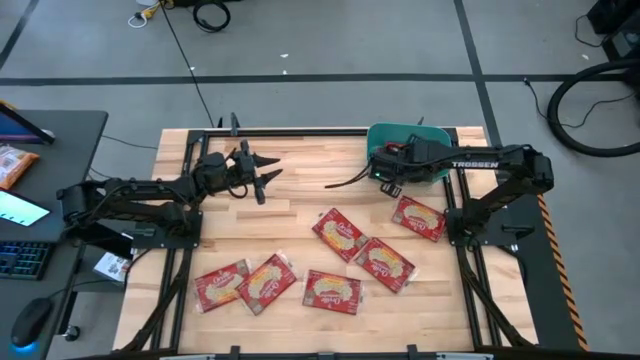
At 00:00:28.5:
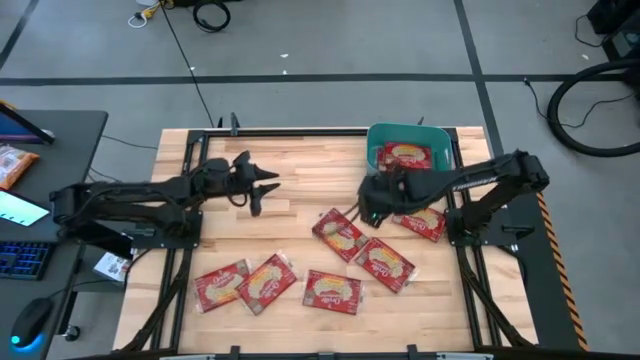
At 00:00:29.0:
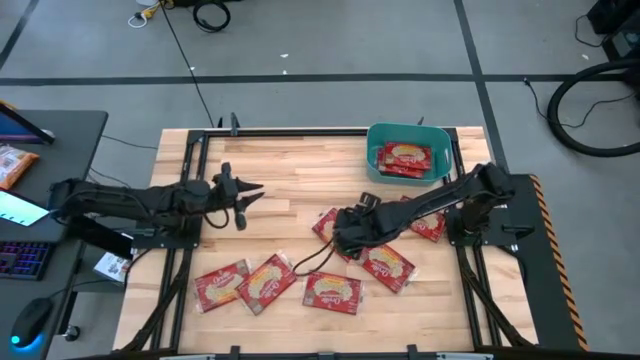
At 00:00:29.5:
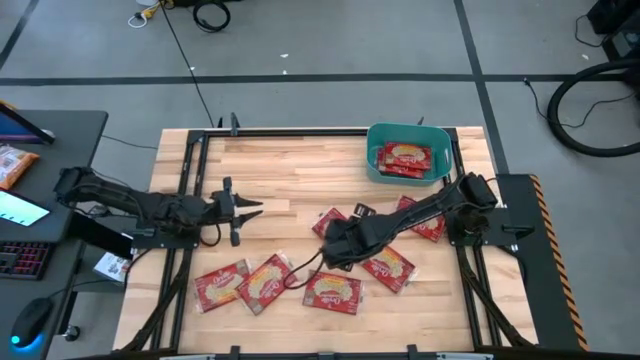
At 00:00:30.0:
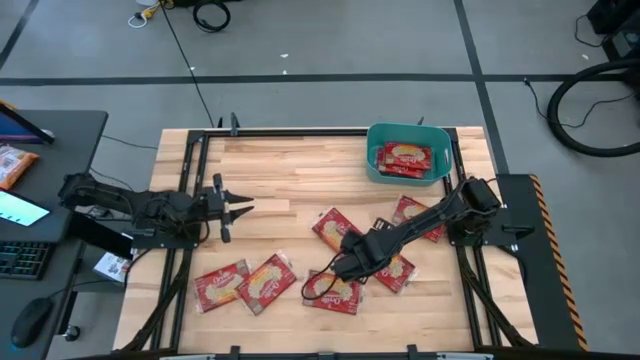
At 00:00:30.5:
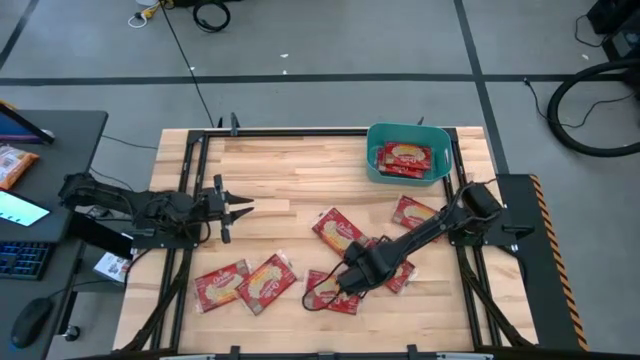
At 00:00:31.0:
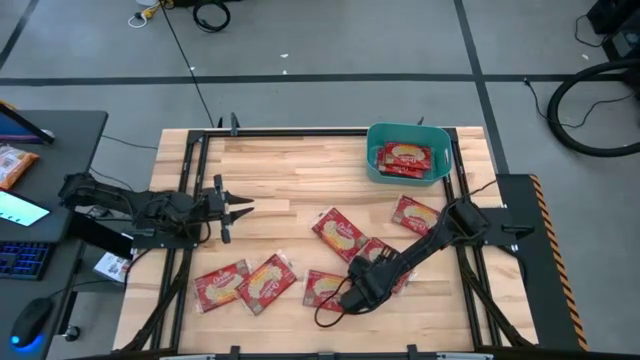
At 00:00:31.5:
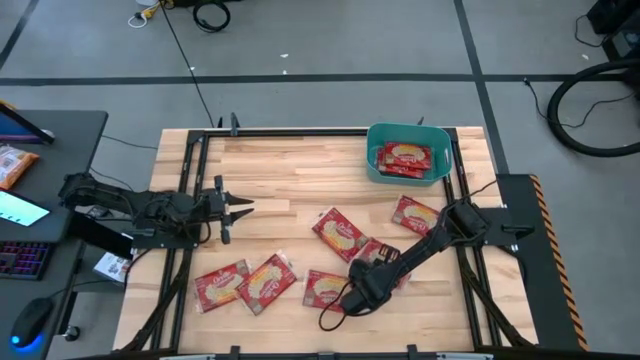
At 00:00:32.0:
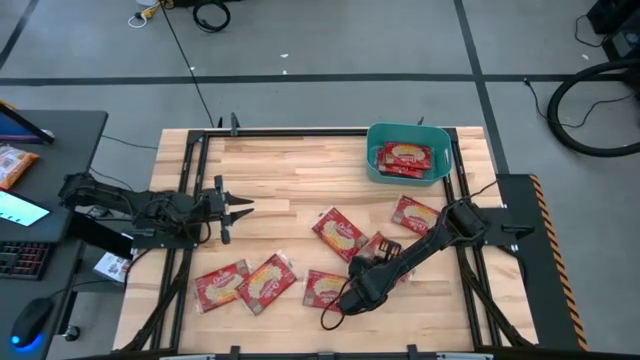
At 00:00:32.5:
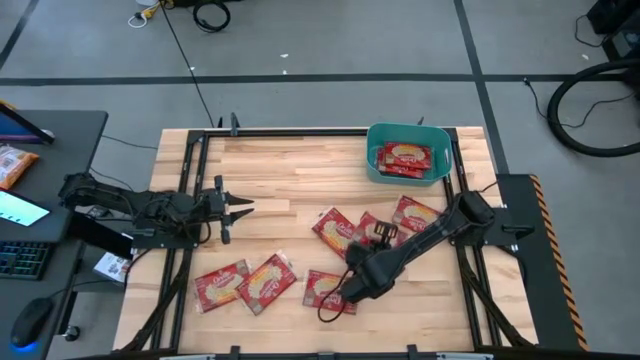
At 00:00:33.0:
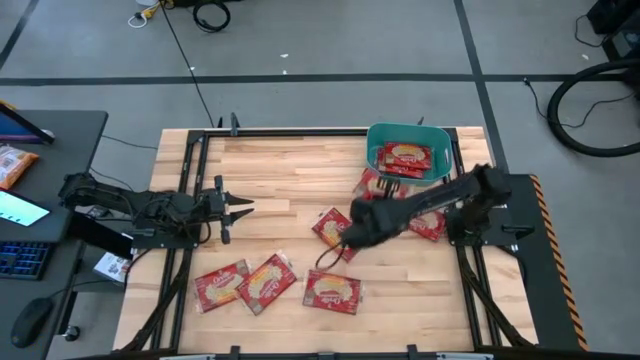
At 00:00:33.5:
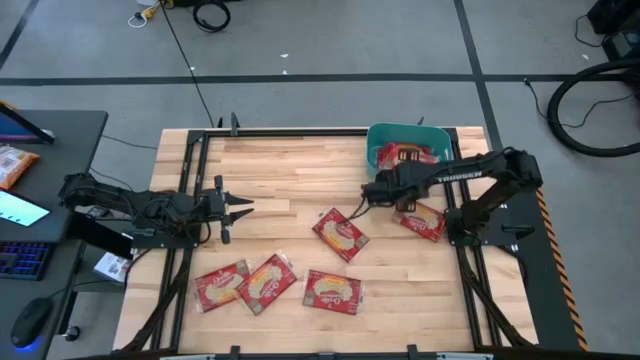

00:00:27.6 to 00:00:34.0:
Task: Sort popcorn bags into baskets
Put the red popcorn bag into the blue bin

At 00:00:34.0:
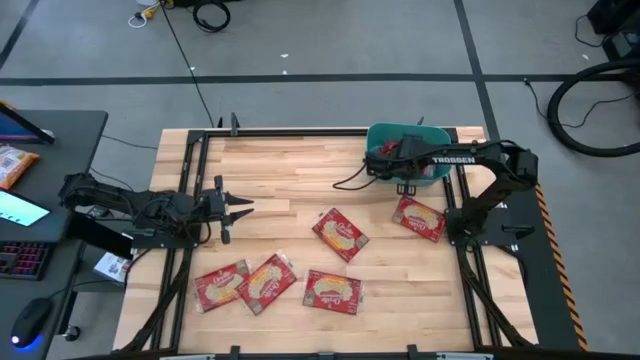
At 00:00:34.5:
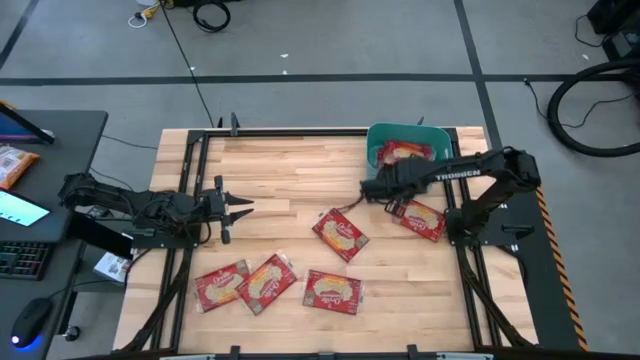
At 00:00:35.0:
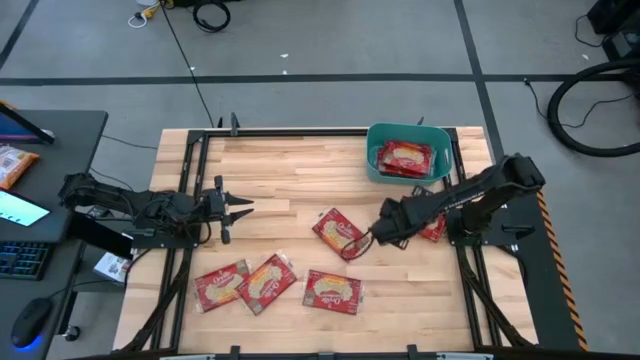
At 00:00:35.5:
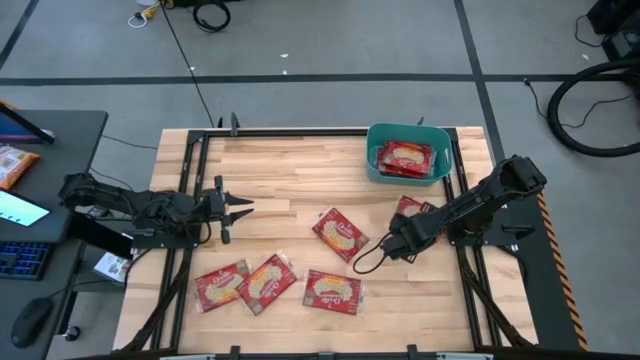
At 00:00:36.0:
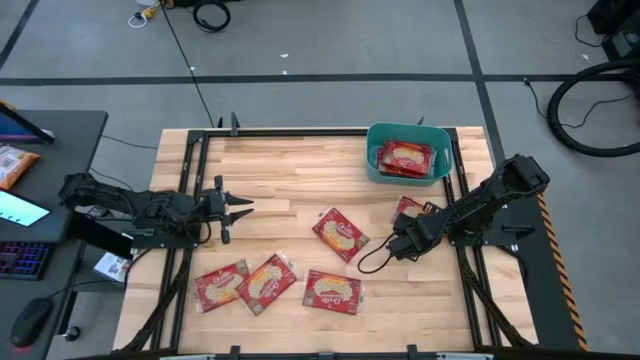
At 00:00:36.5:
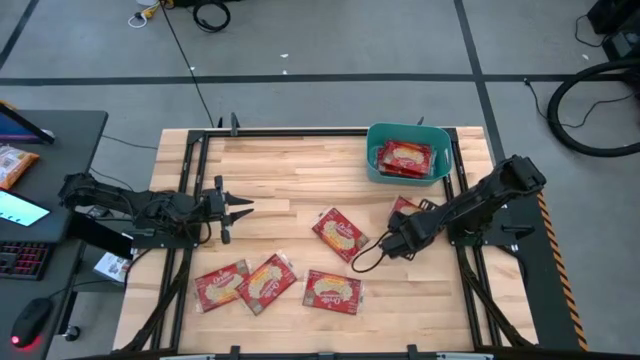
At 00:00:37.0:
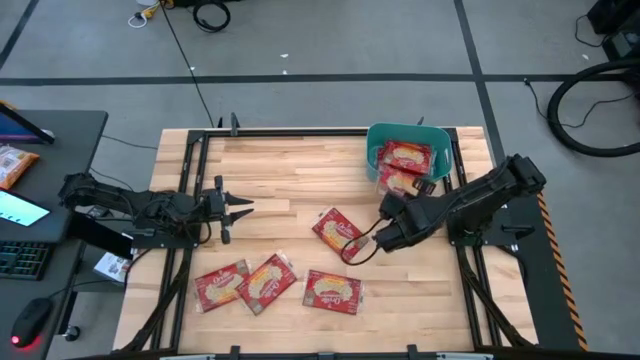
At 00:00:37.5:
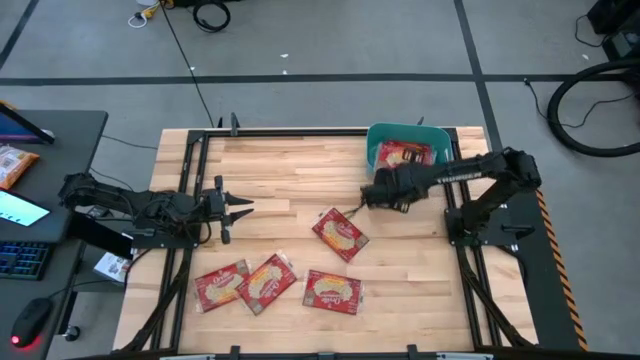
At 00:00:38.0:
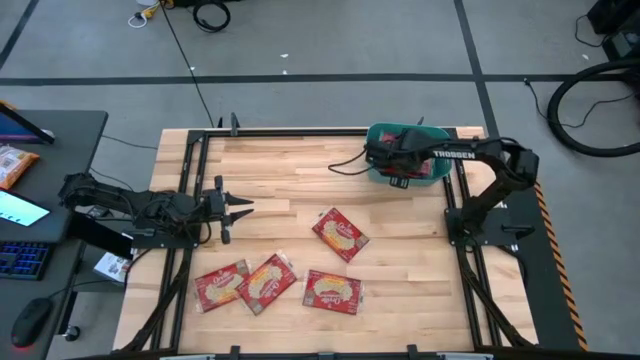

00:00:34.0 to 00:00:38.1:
Put the red popcorn bag into the blue bin

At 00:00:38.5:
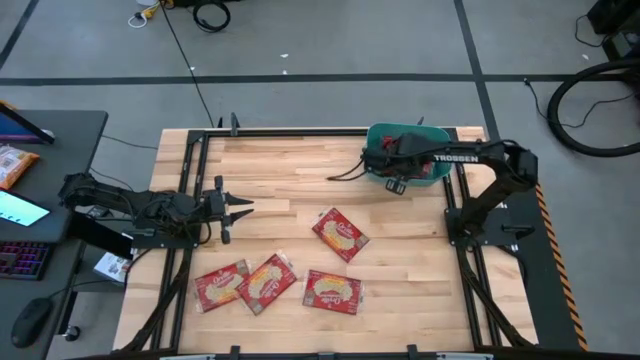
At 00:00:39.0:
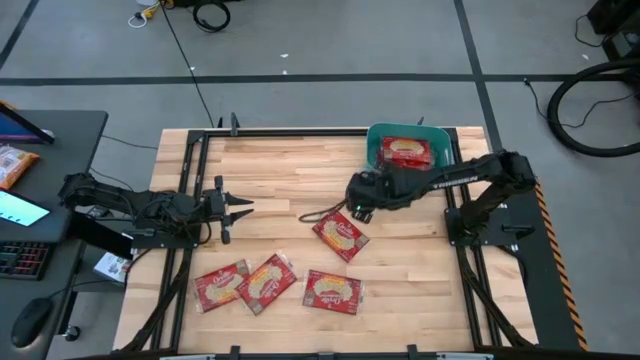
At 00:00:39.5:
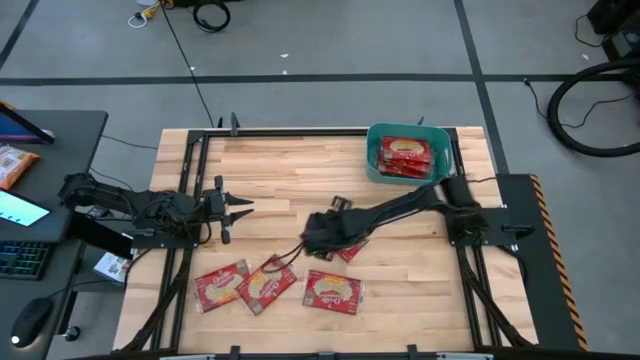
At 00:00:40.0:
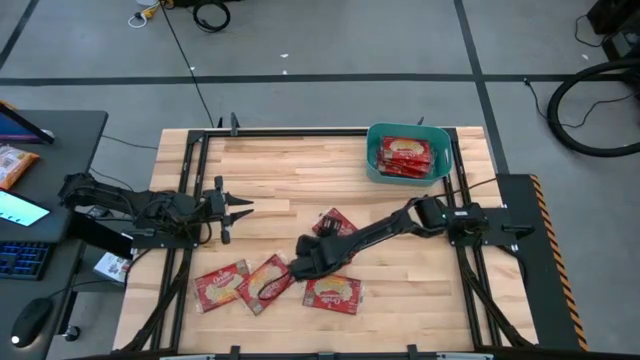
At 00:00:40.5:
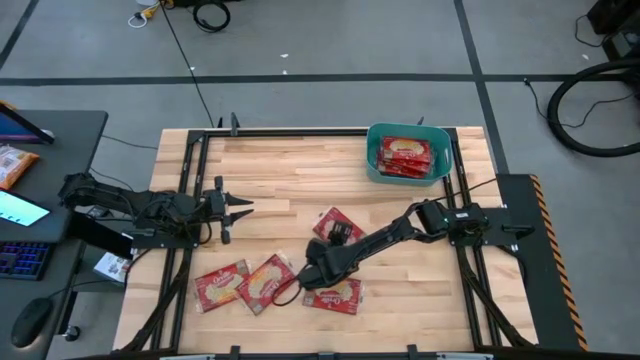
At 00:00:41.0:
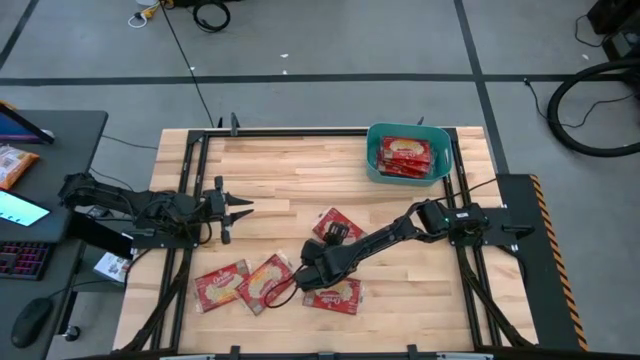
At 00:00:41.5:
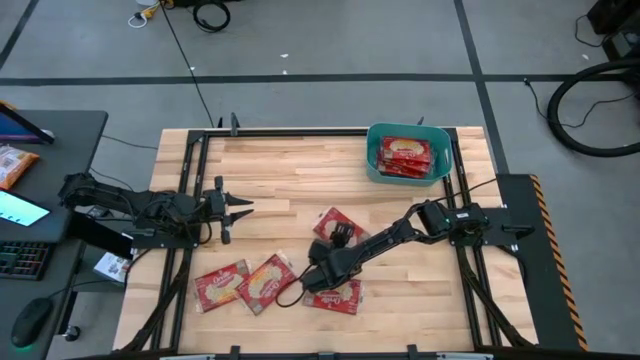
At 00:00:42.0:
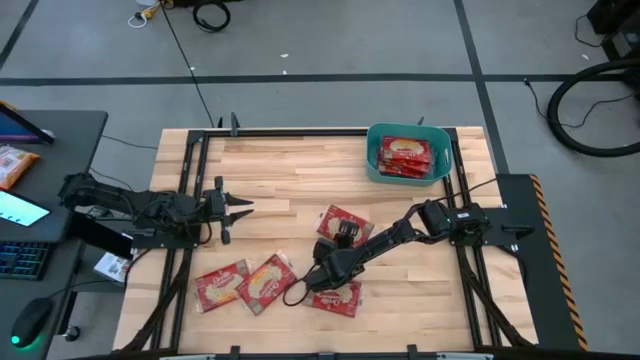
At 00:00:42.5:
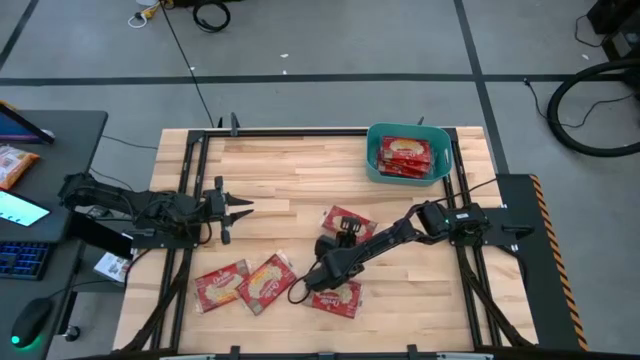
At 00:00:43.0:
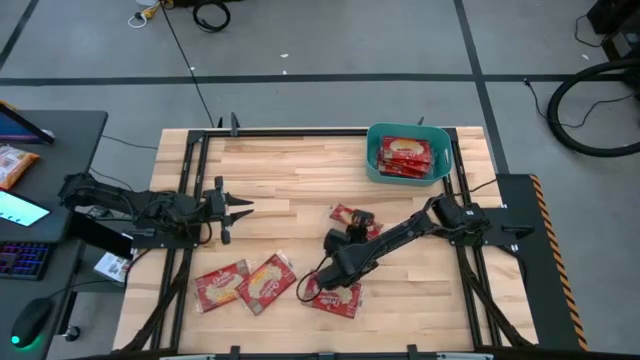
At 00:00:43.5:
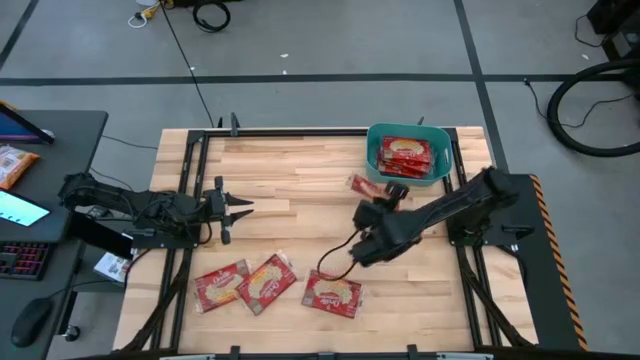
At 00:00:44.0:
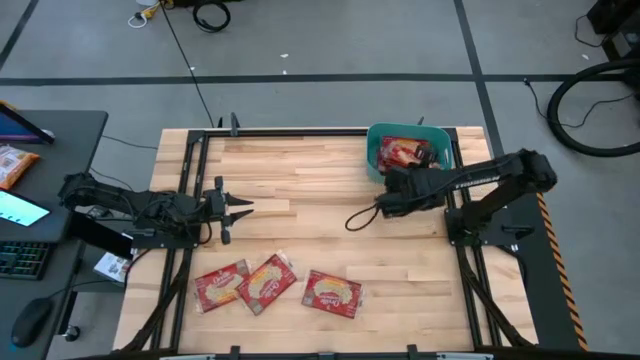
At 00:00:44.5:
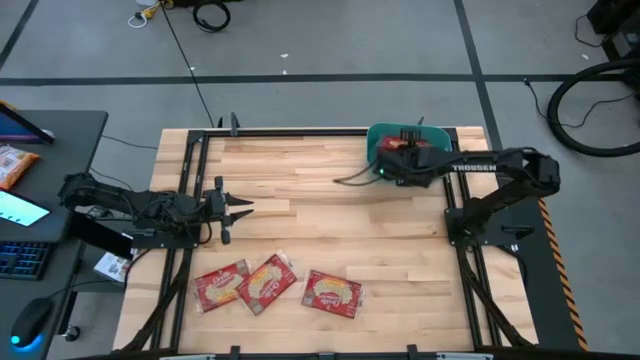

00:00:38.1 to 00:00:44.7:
Put the red popcorn bag into the blue bin

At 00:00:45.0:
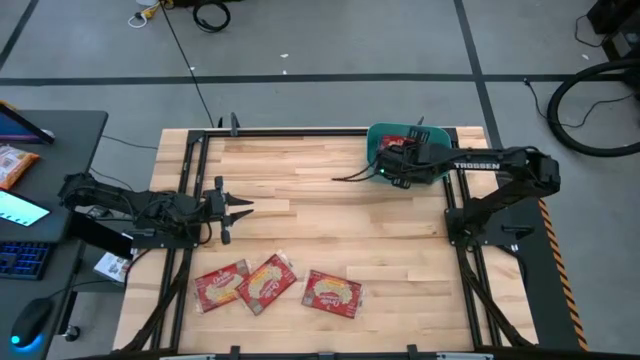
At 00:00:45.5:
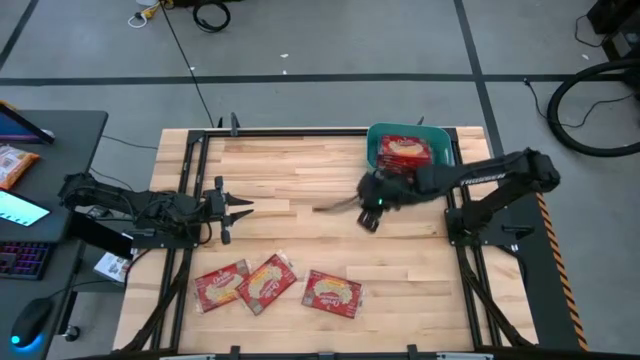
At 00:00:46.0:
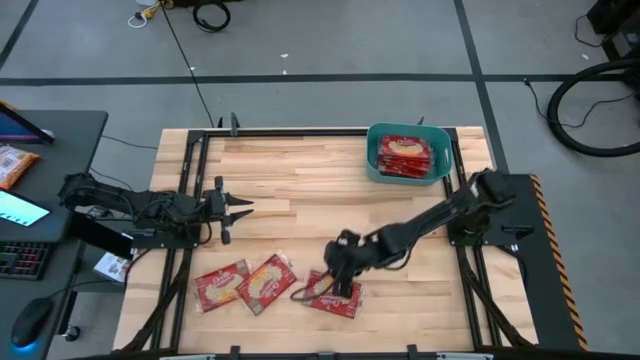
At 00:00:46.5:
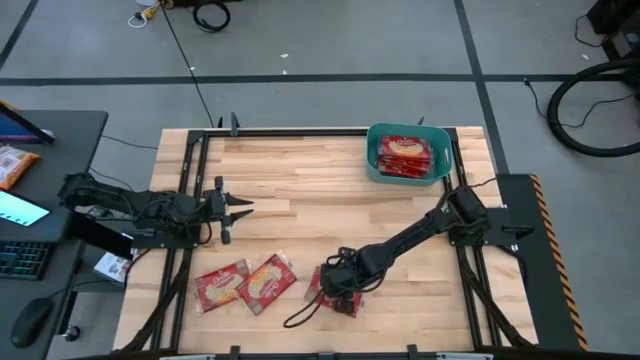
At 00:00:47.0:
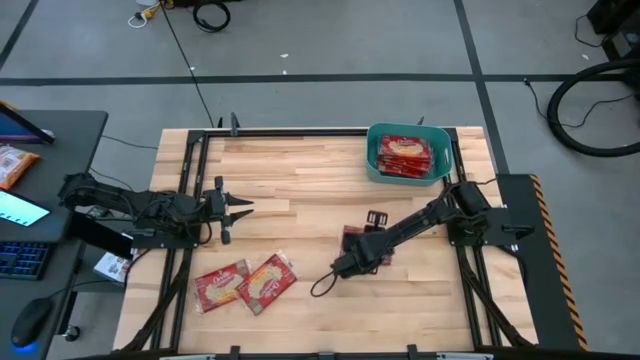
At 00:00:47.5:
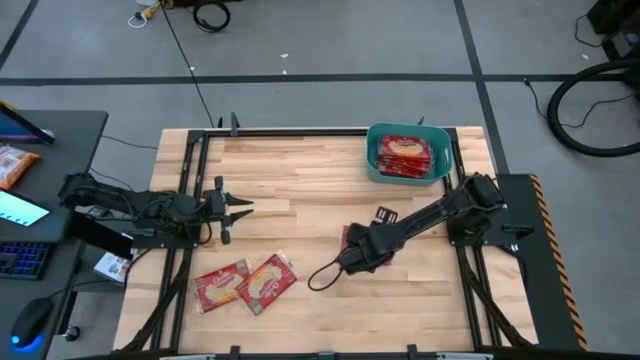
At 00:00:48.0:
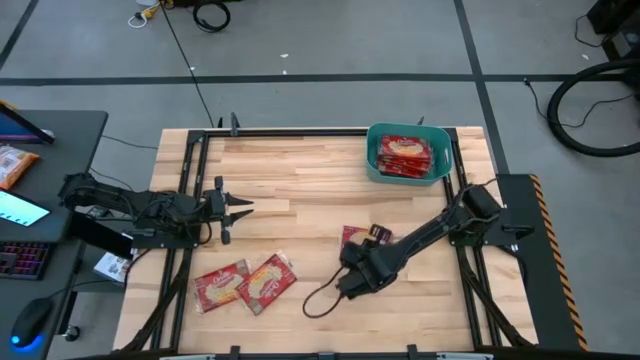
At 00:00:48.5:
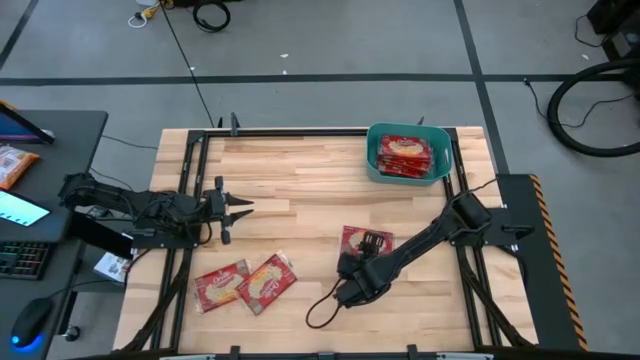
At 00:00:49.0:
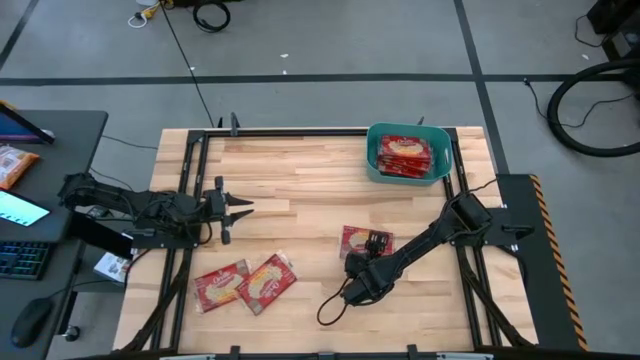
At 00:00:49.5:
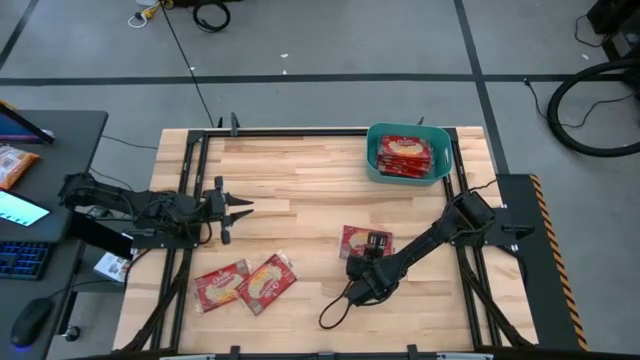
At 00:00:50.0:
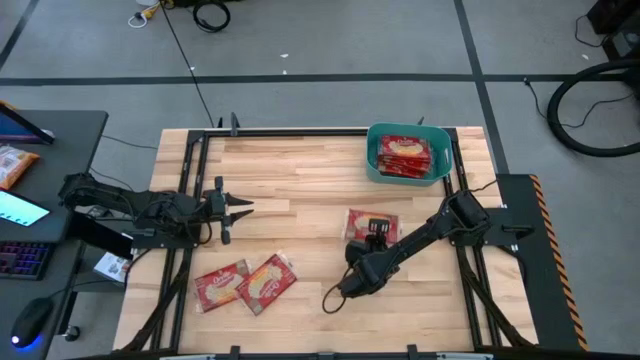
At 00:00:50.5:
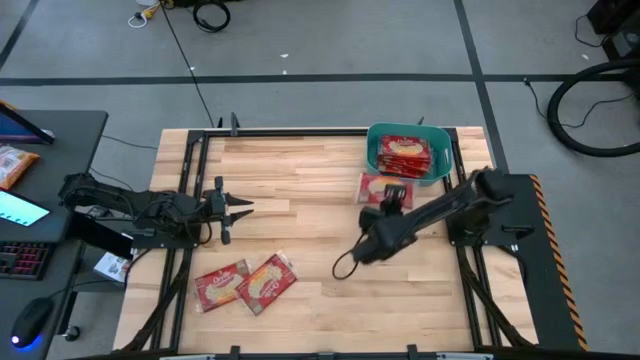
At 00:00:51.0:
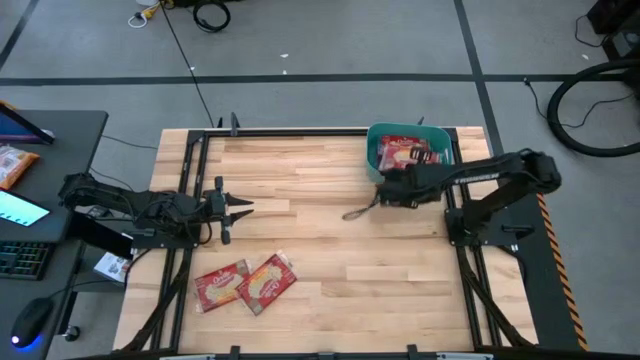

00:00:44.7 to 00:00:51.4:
Put the red popcorn bag into the blue bin
